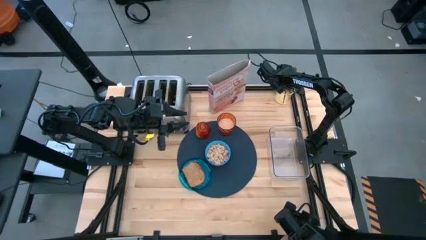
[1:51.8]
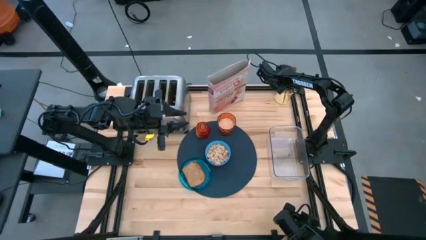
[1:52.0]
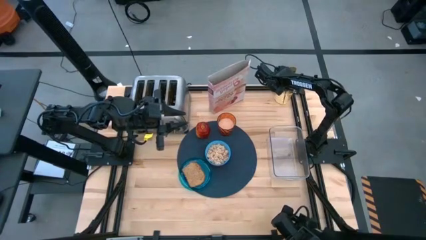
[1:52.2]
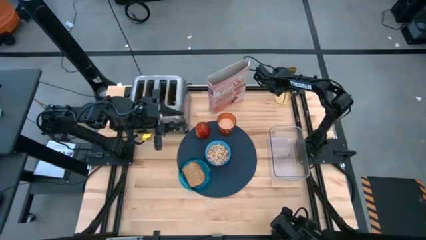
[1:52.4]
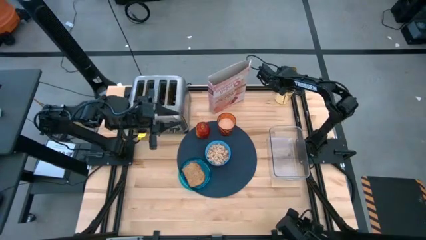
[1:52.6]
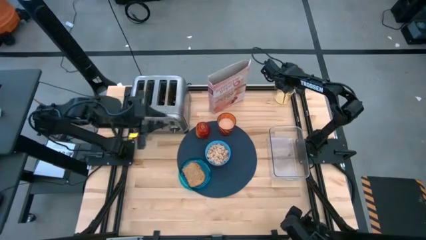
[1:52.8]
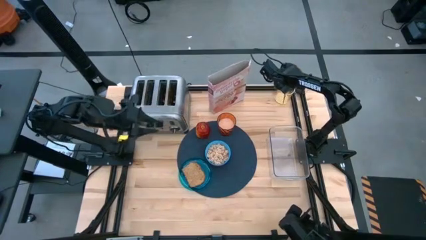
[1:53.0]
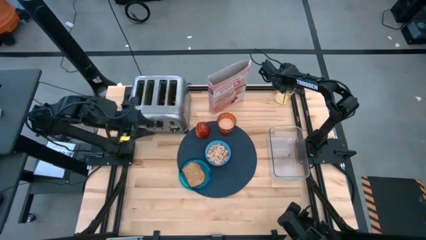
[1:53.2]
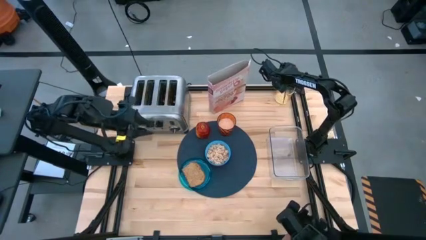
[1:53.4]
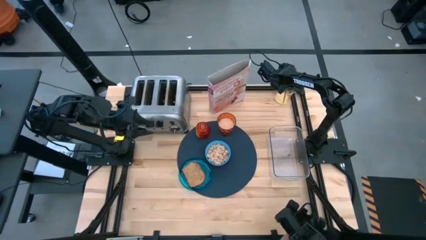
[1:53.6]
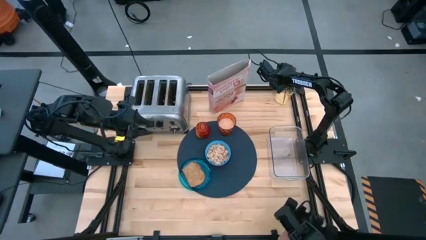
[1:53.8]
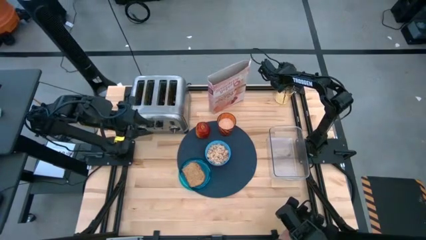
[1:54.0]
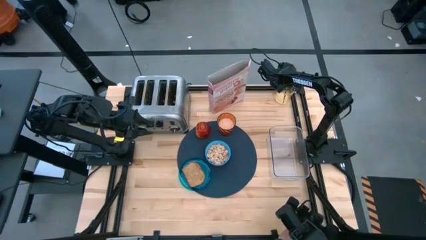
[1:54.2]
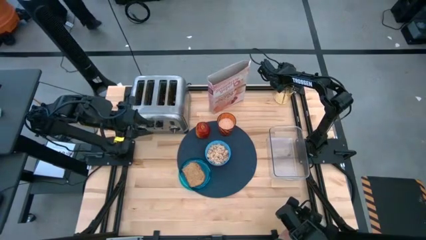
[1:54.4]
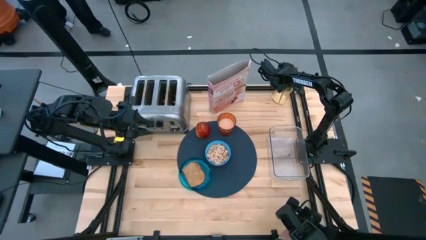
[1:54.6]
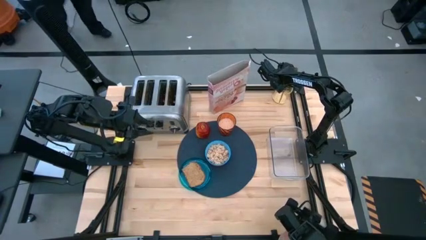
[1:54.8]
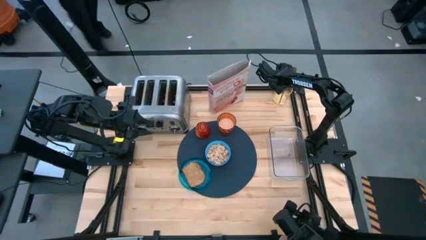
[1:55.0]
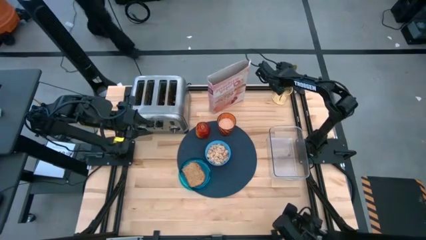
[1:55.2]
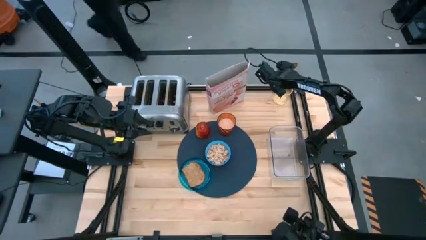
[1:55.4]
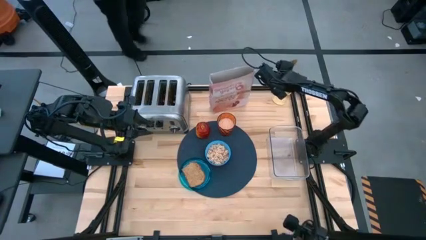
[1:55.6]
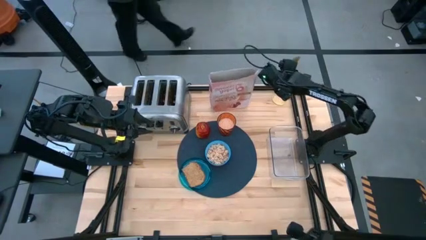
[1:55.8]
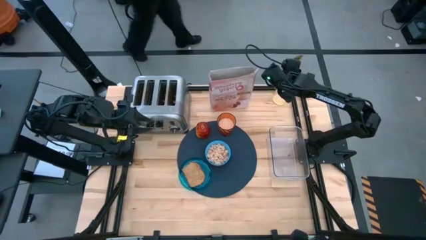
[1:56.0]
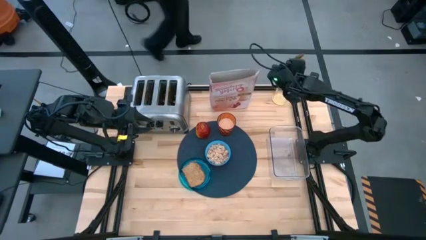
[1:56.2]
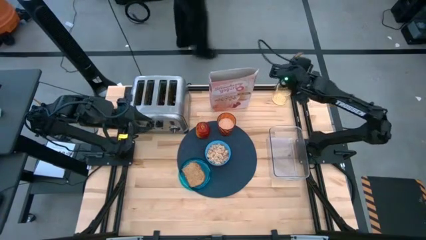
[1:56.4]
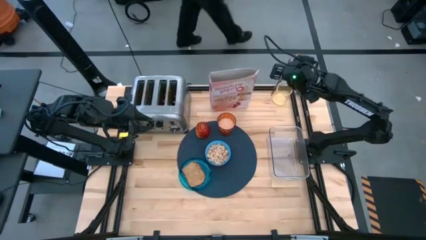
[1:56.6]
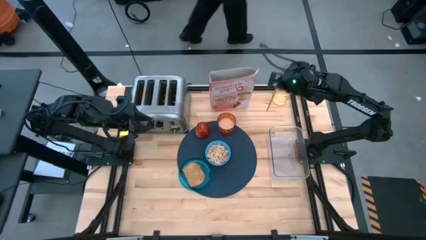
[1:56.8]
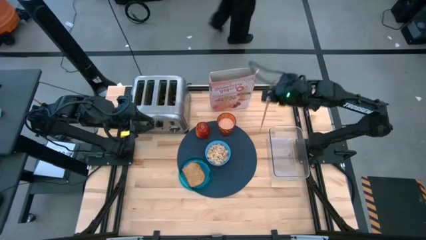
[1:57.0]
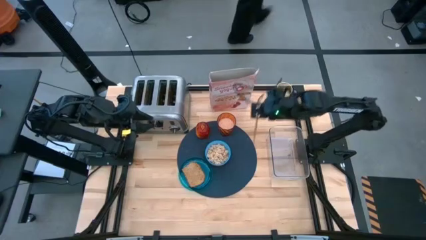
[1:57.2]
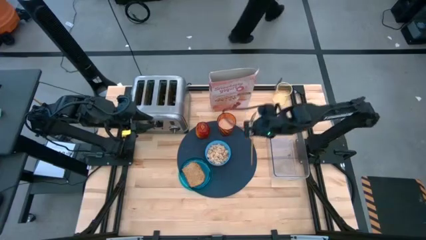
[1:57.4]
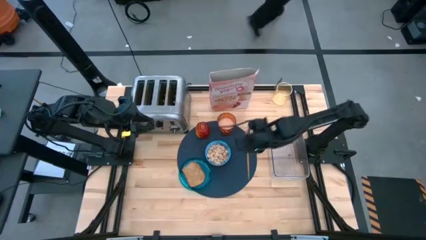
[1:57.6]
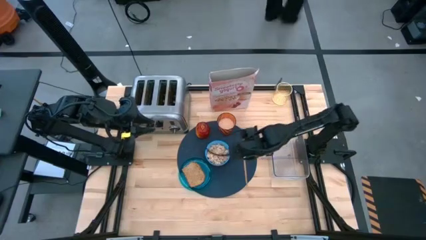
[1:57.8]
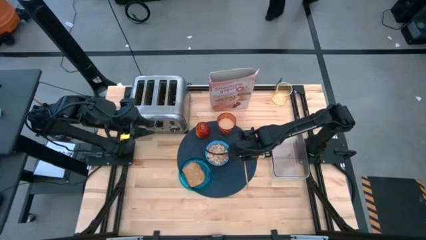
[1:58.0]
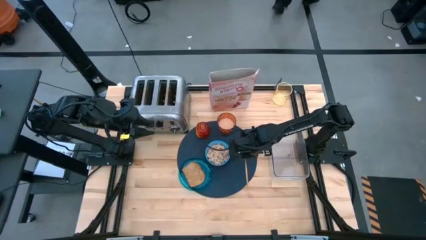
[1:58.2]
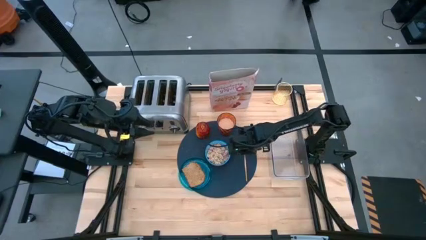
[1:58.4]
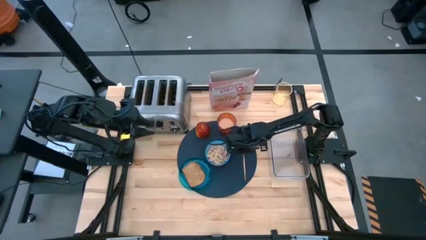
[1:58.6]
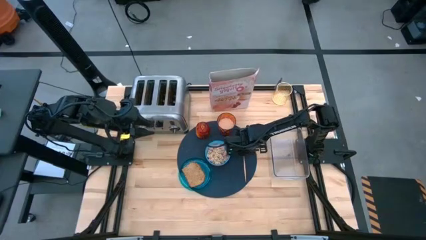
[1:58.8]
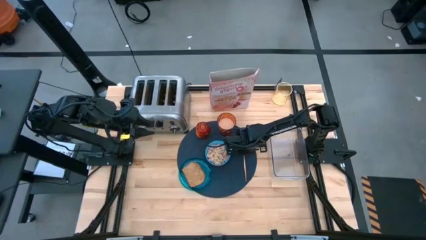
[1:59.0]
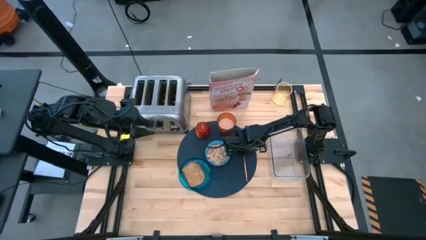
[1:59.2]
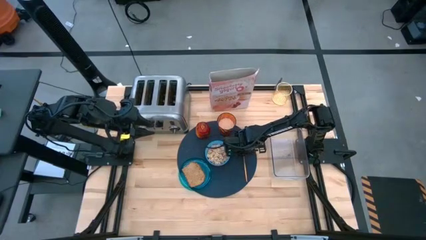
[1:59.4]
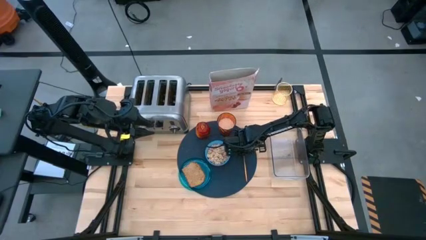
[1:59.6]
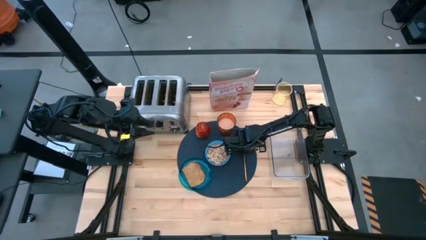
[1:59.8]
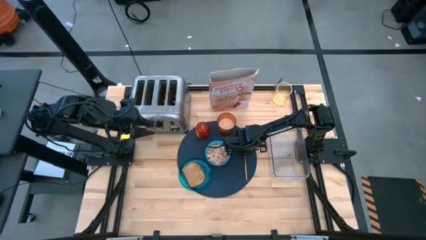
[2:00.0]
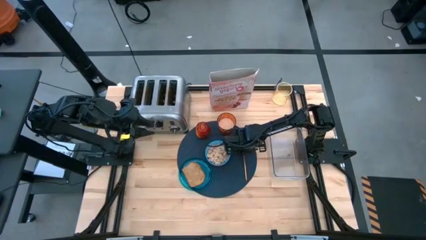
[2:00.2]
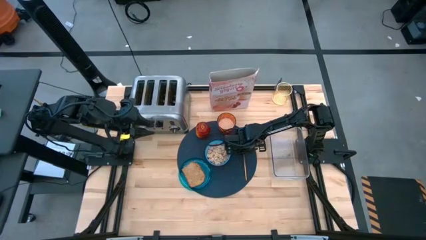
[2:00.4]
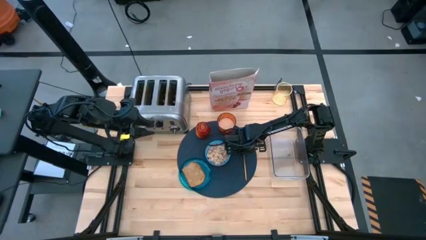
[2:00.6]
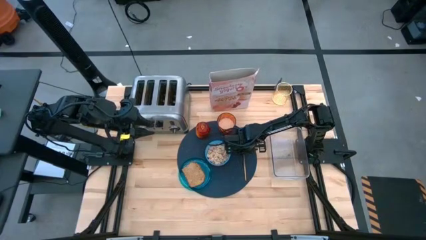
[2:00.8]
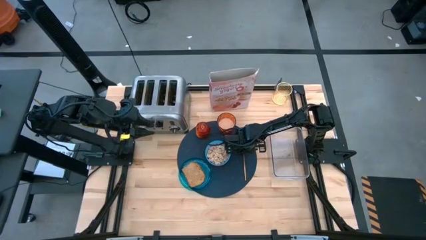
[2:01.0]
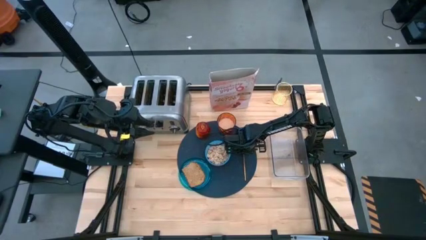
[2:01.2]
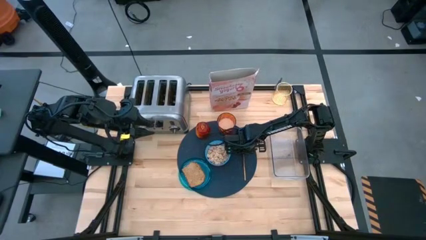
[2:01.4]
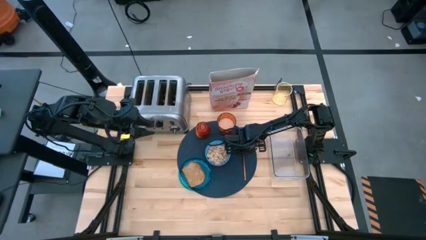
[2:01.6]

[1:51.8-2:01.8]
Task: Arrange a breakfast setting
Put the gold spoon on the blue table mat to the right of the blue bowl

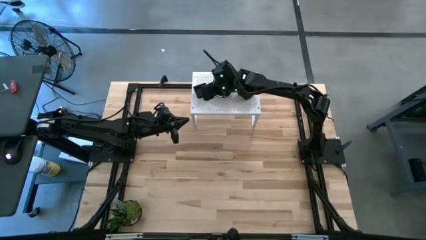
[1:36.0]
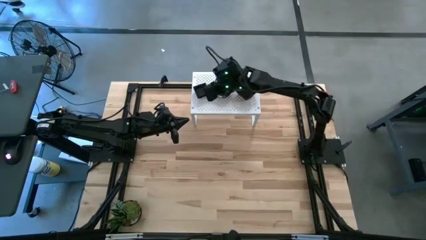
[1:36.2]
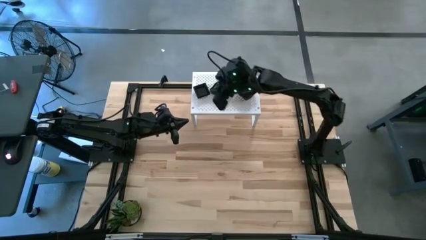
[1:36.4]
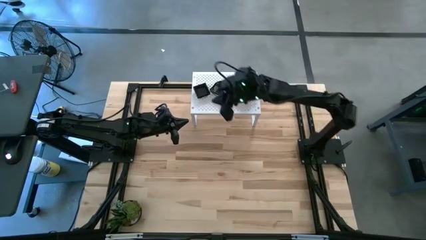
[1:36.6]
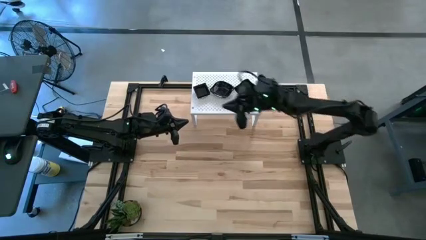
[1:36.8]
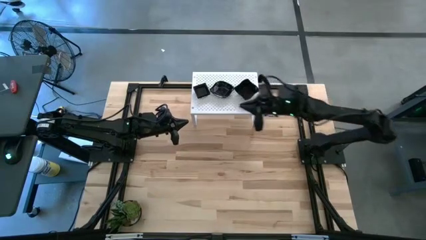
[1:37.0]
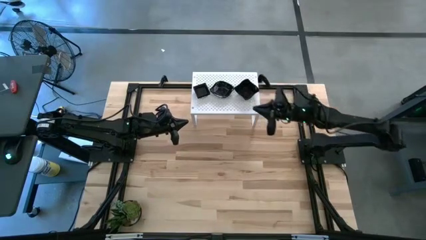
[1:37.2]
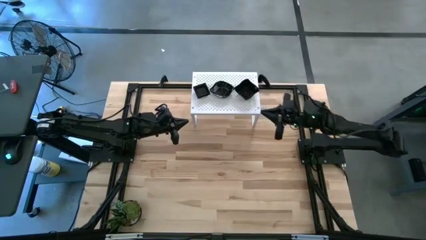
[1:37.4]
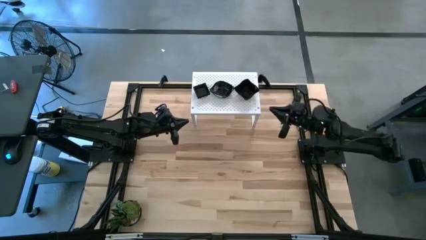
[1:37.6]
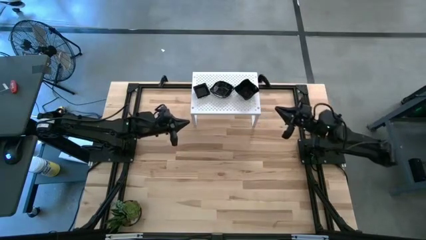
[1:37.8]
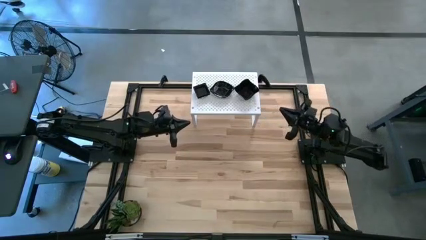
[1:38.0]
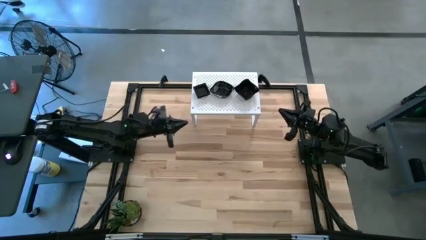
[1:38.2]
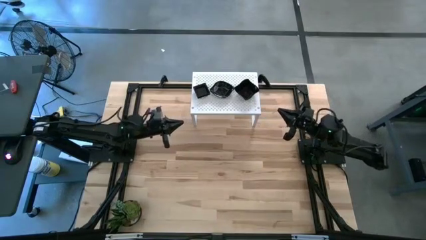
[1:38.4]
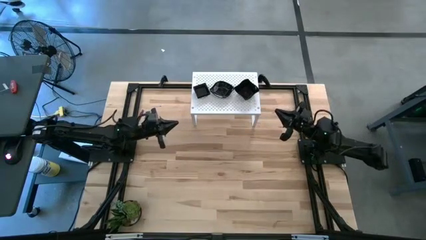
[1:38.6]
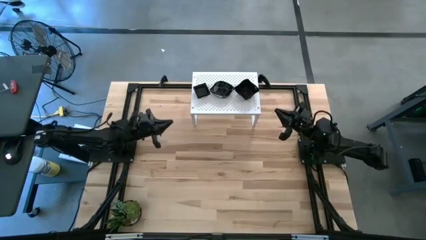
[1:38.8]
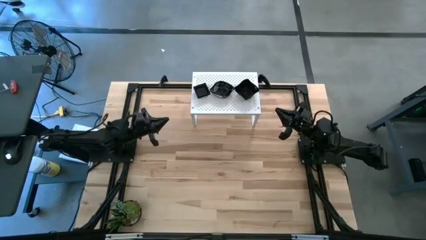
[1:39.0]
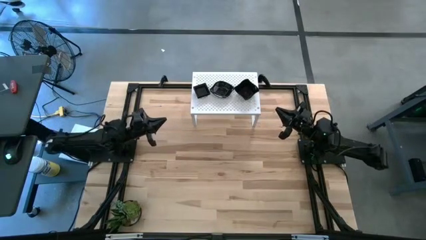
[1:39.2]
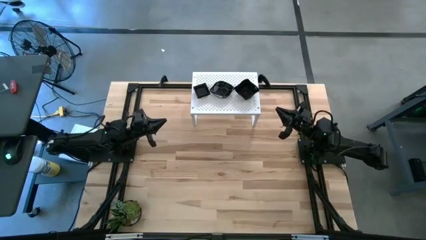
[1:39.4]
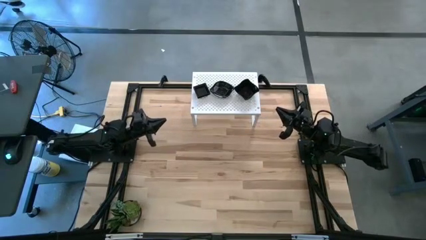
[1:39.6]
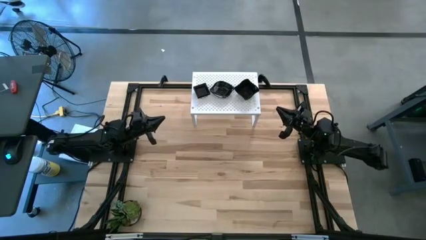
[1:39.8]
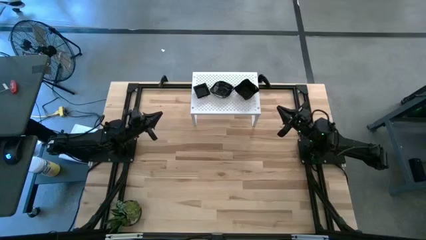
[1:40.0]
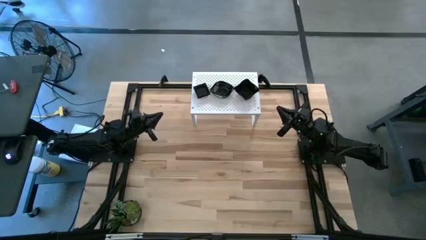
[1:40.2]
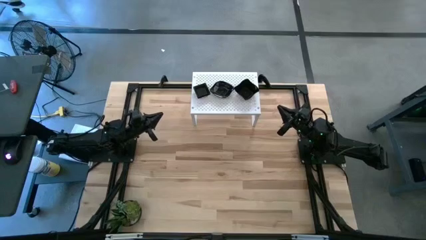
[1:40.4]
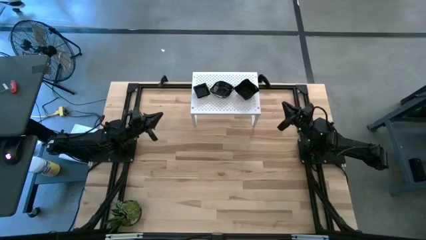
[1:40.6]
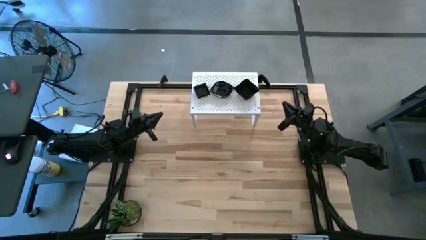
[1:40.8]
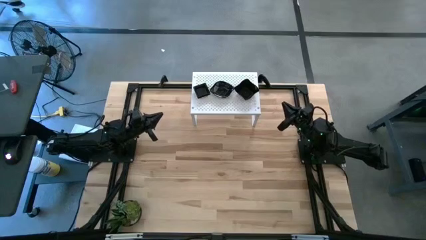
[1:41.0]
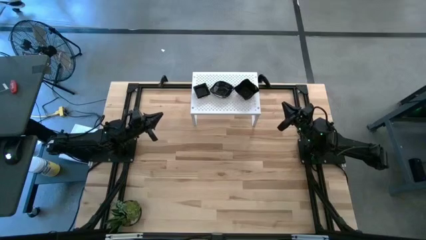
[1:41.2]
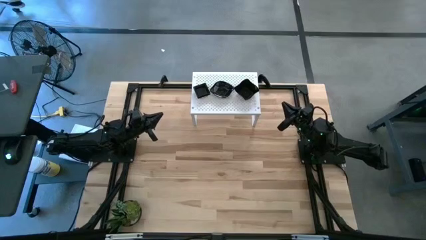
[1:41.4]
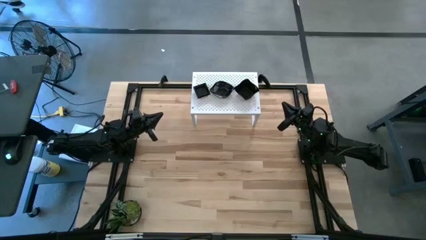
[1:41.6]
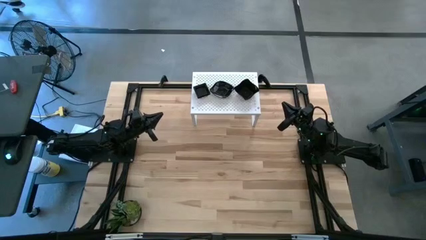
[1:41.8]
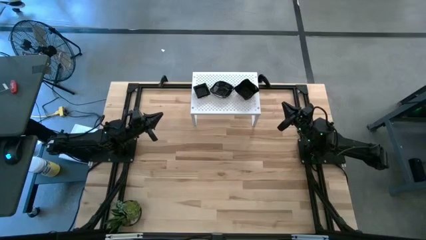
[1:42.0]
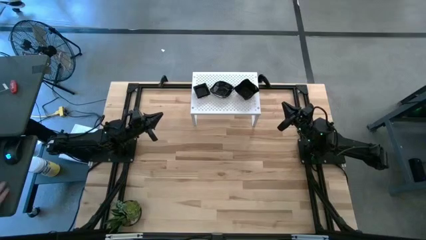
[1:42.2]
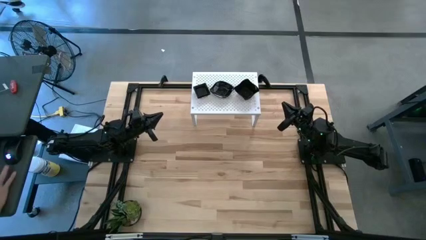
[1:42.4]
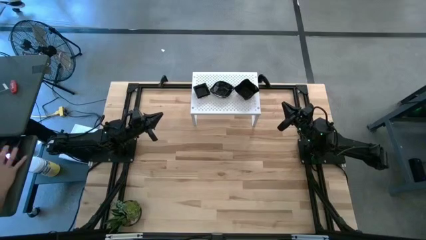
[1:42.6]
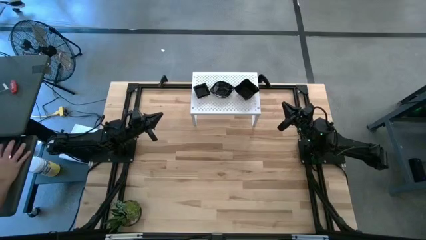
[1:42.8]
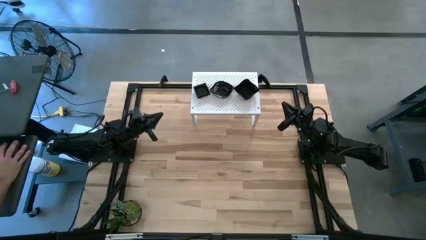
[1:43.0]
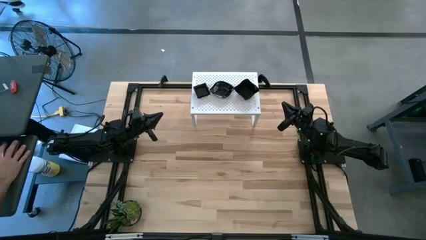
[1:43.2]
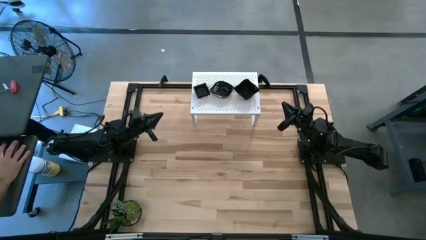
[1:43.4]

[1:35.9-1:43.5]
Task: Pick & Place Mini shaped plates
Return to Home Position
